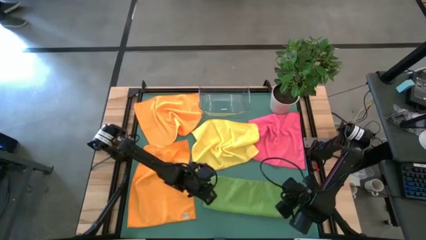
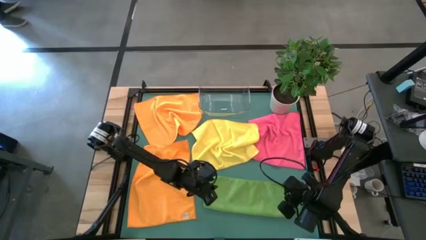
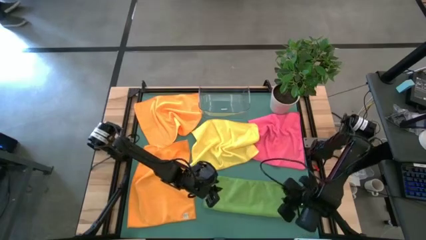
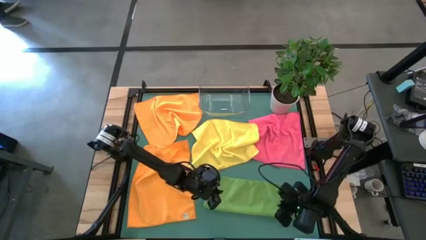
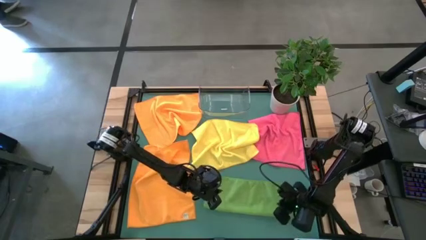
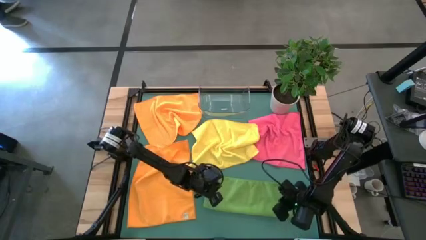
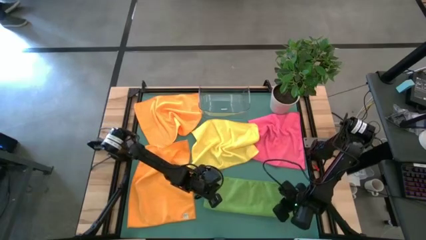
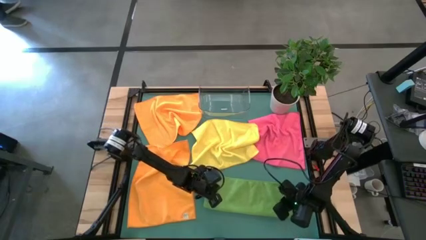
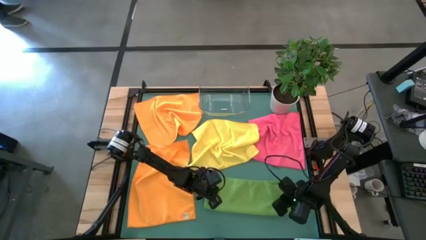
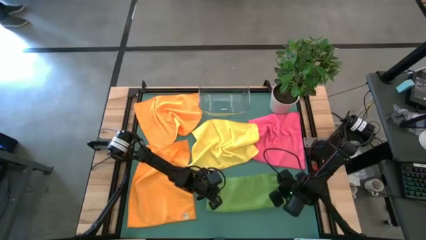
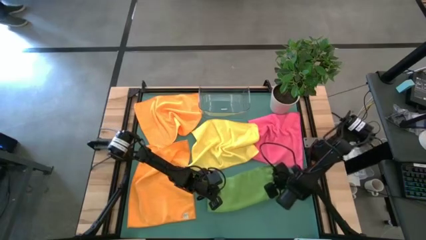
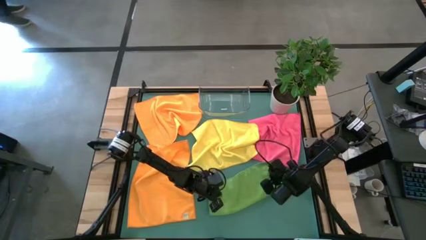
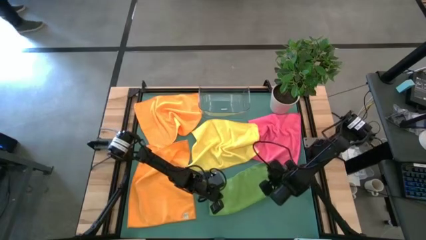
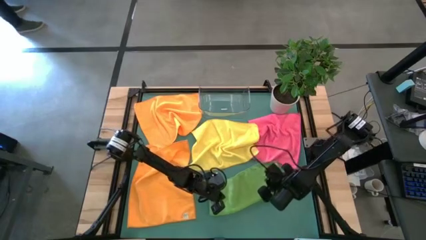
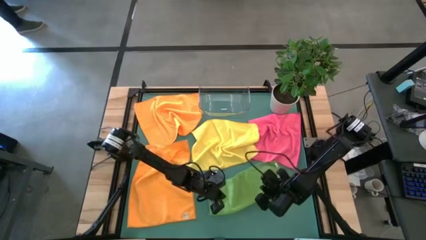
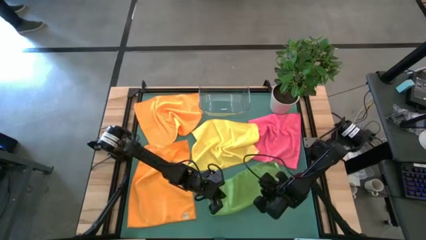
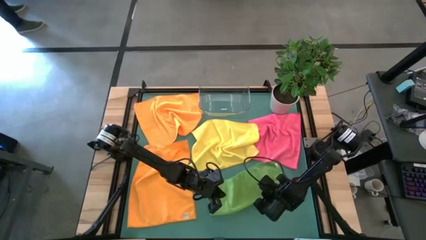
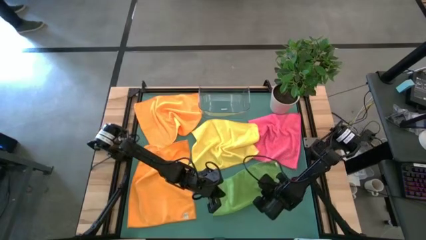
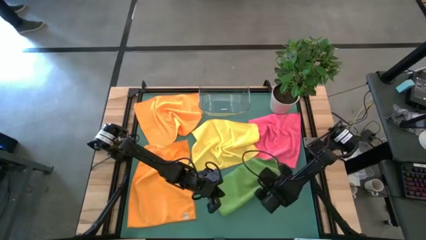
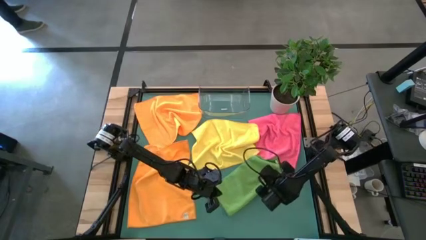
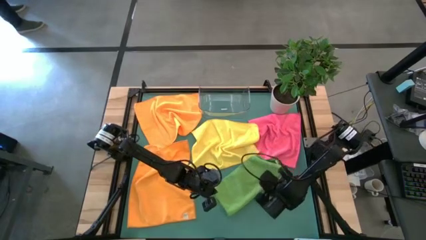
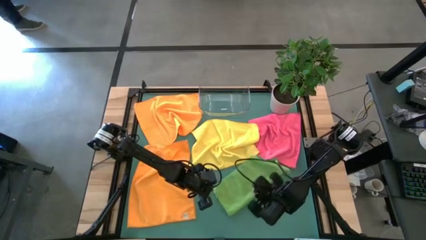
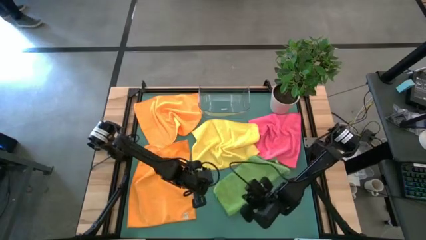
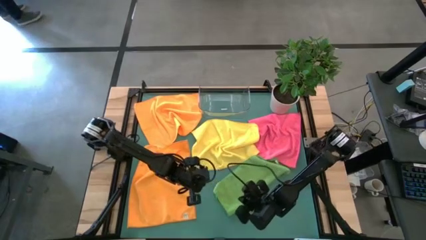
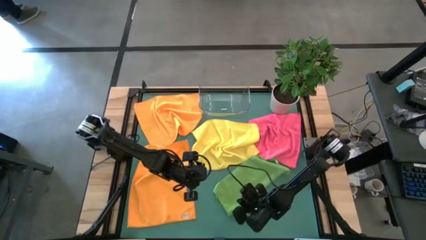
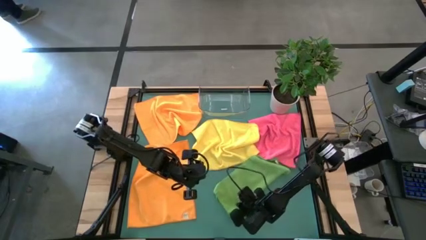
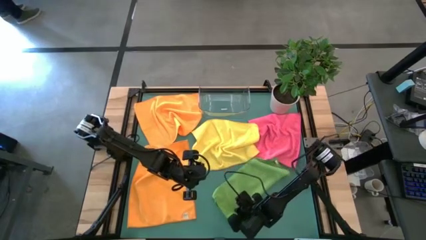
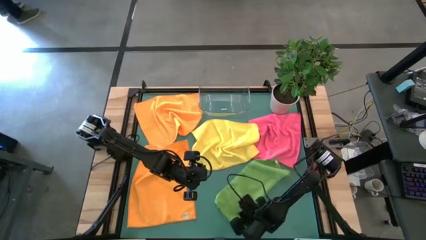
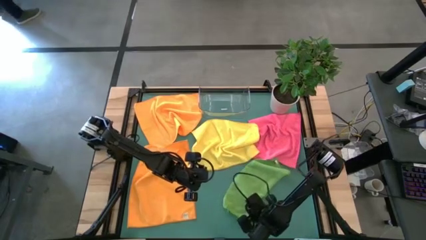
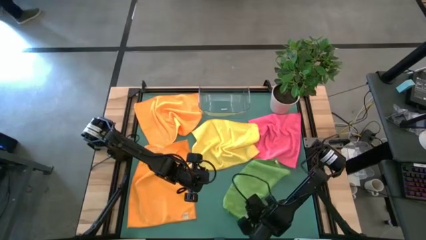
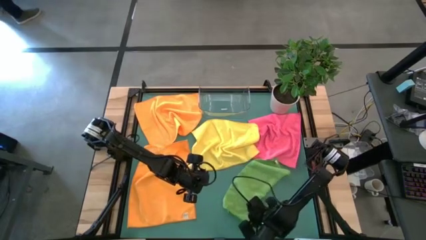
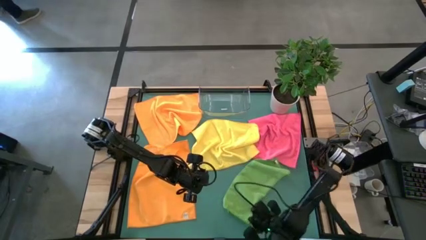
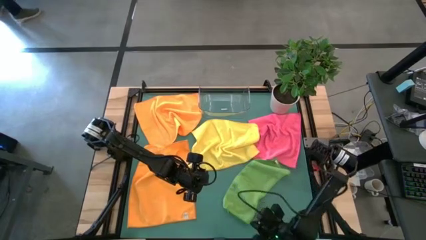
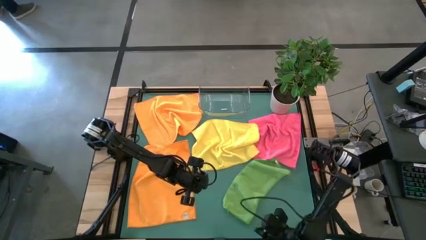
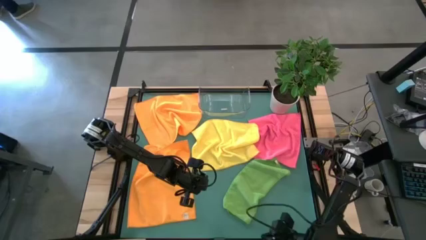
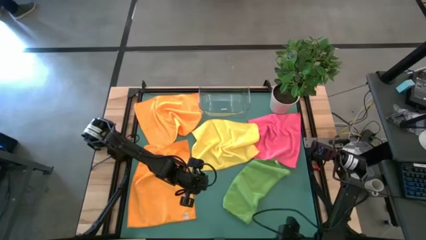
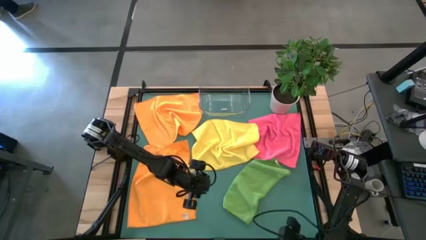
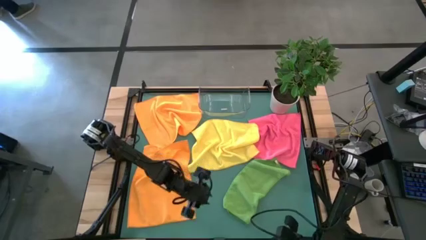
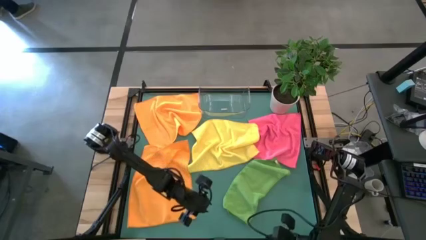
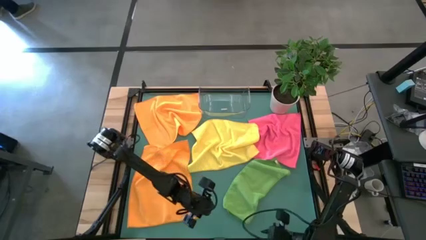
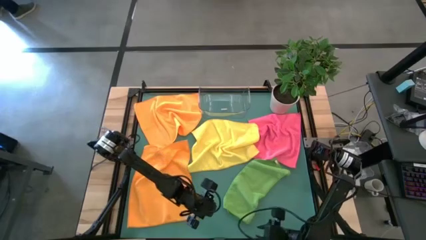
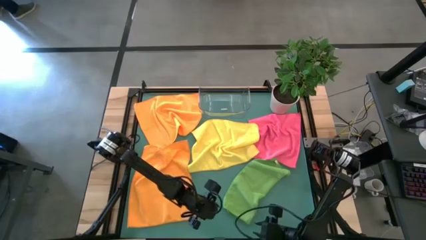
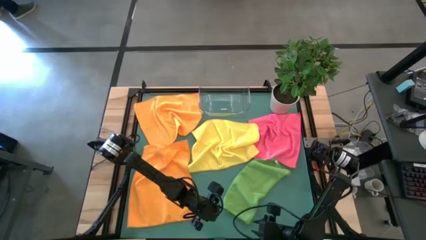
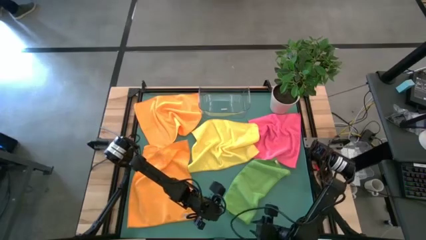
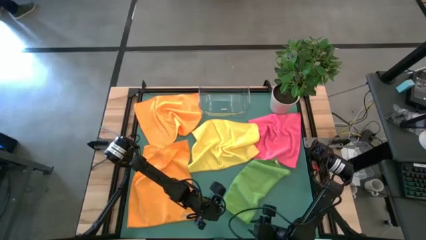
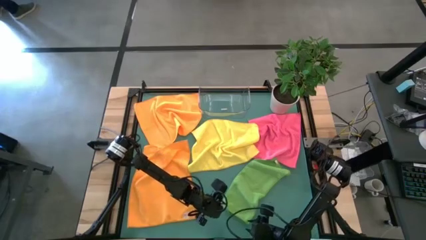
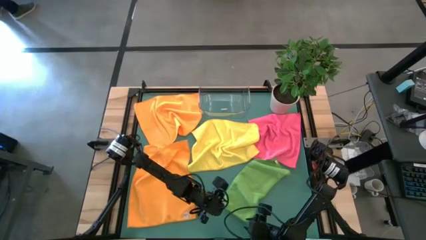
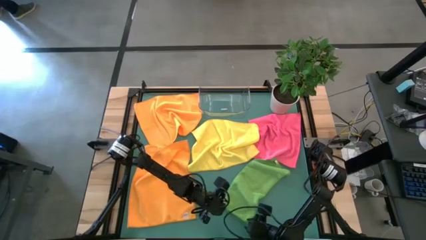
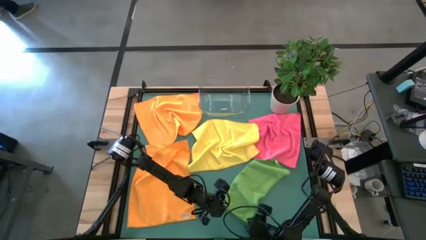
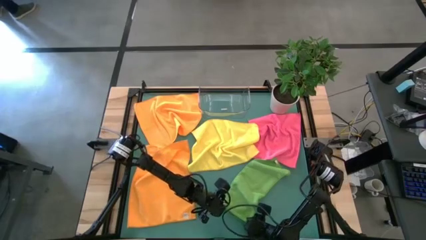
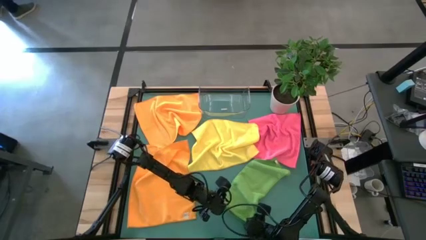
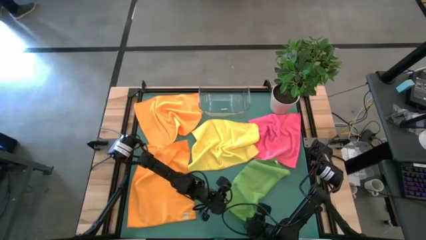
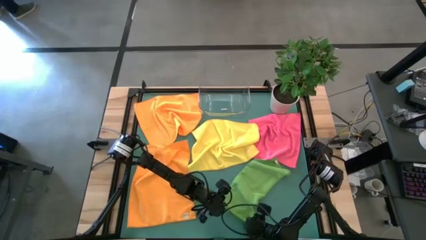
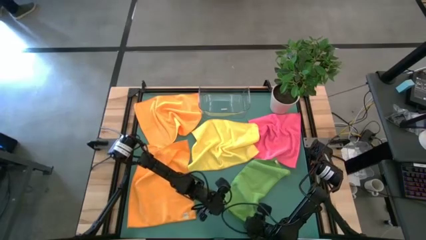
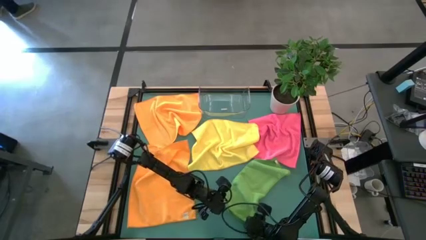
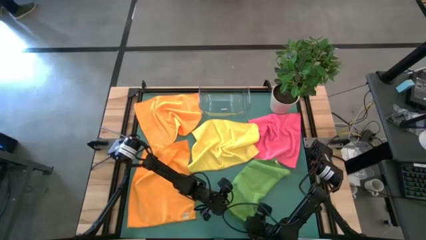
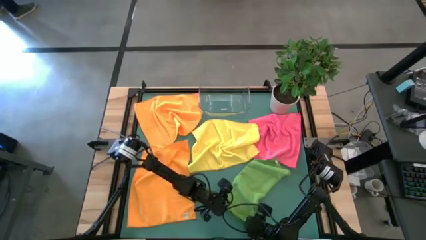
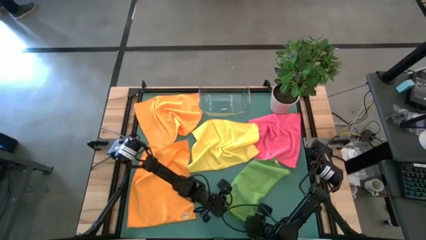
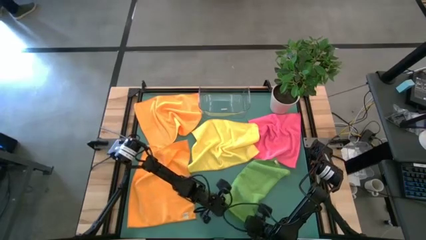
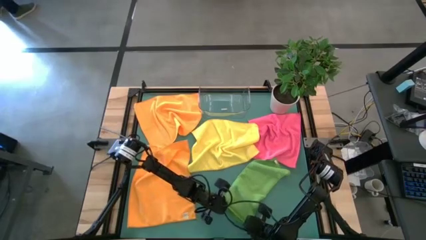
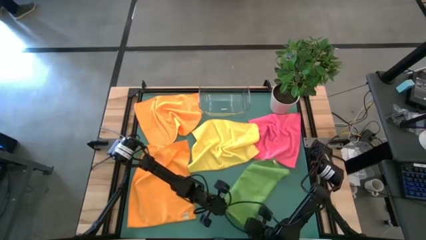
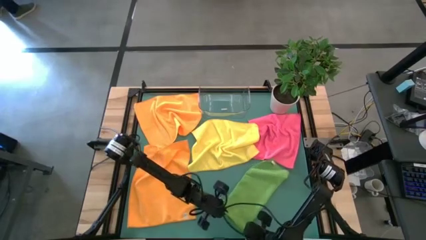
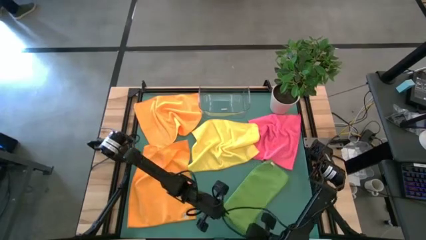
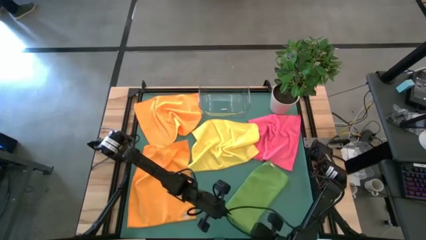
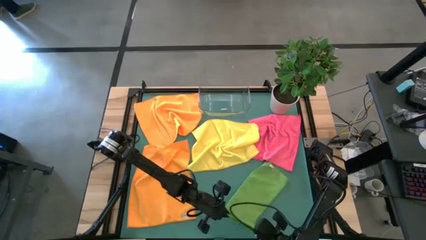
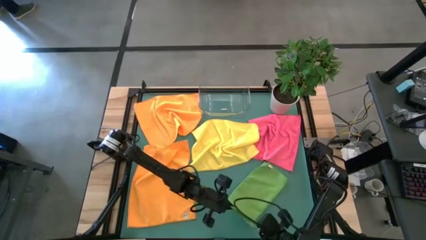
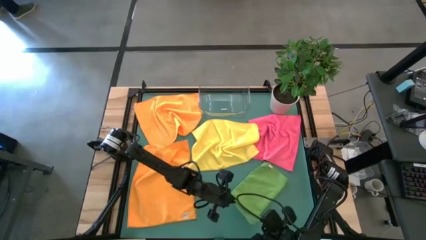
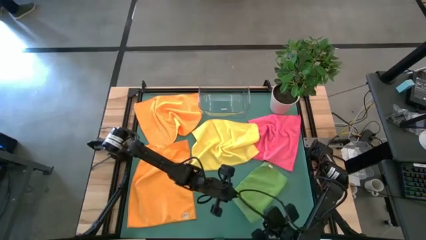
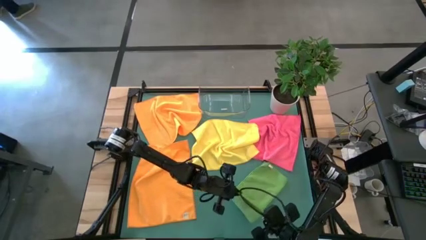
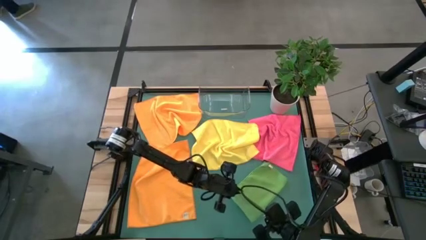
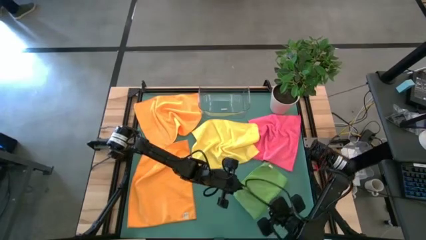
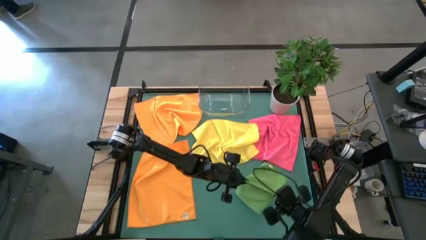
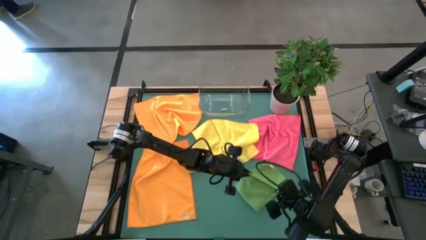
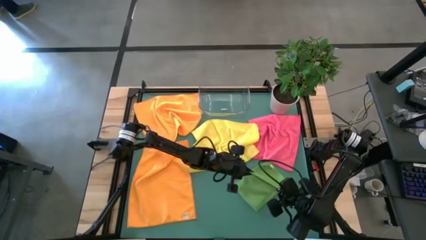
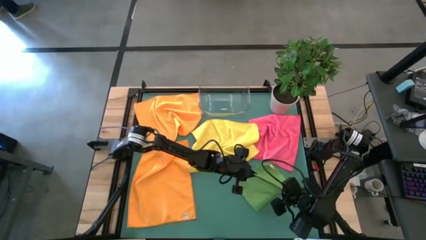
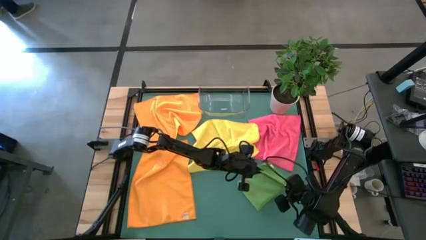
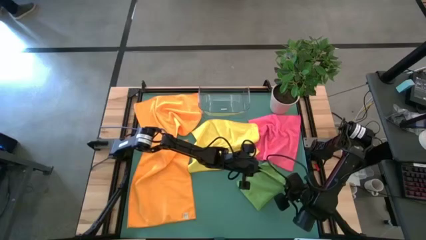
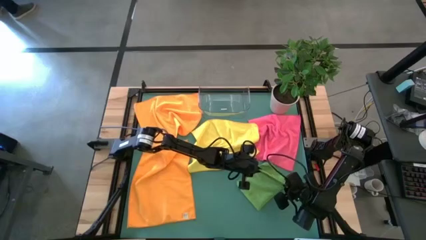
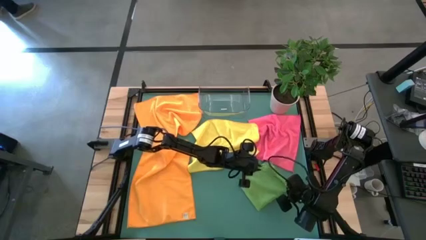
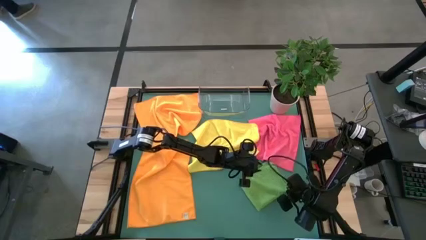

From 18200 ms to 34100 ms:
Task: Fold microfiber towels
Fold the green towel
